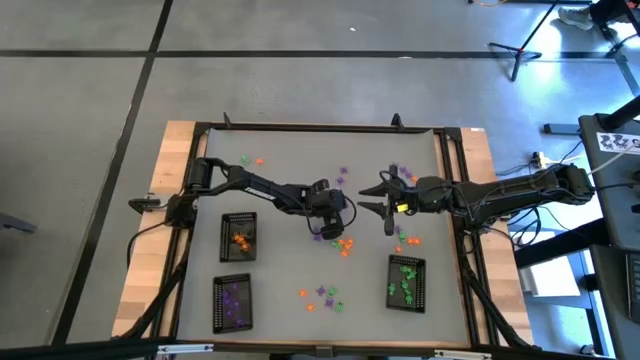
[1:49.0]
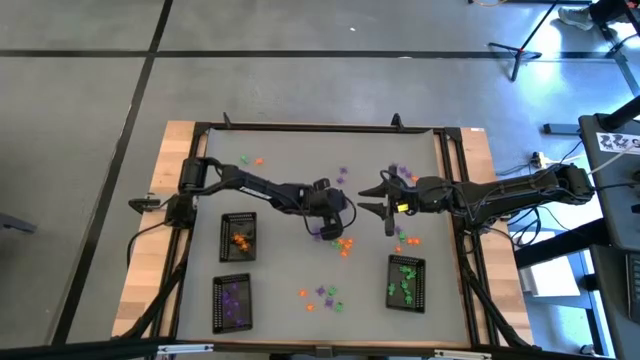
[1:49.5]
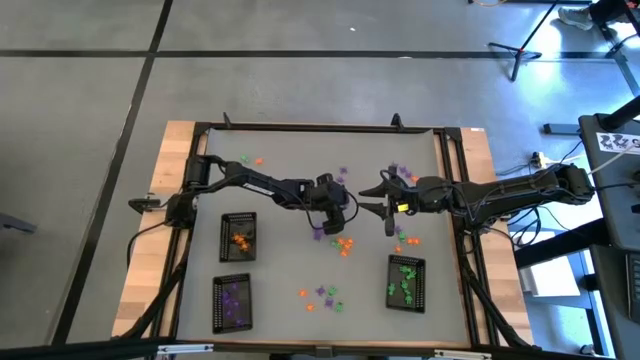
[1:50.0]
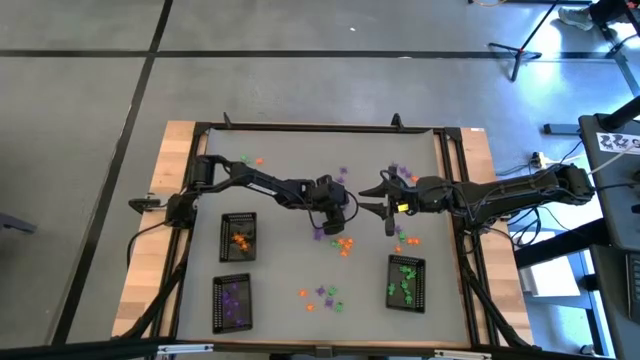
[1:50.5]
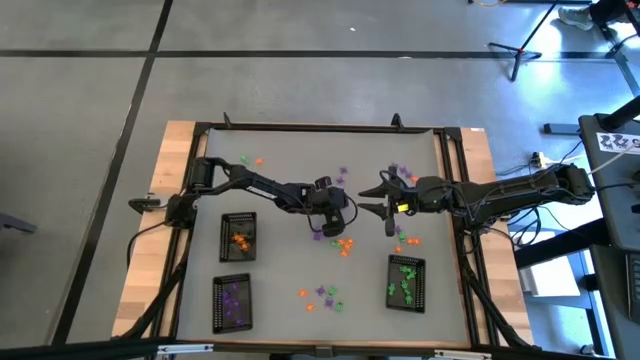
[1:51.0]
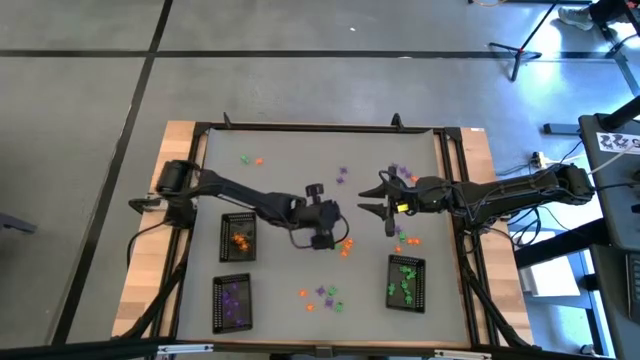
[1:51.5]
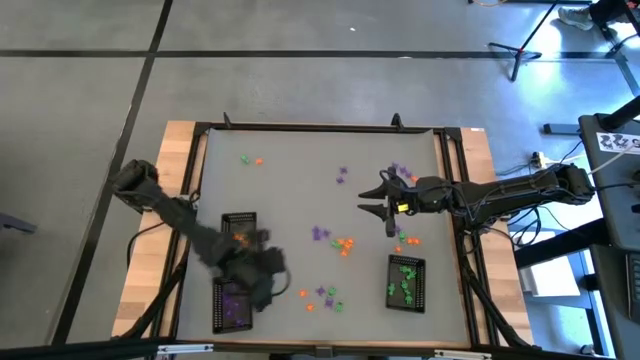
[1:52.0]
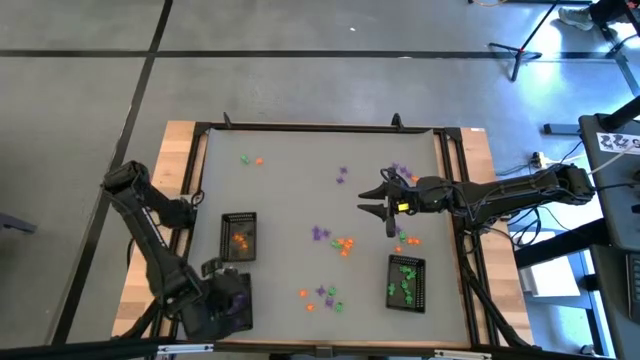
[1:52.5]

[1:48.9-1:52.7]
Task: Sort Halloween decoration
Put the purple spider toy into the bottom left black basket

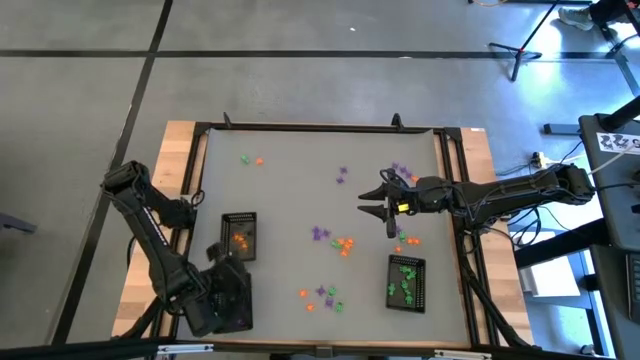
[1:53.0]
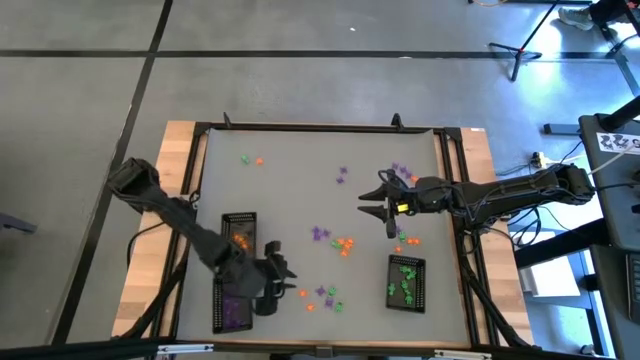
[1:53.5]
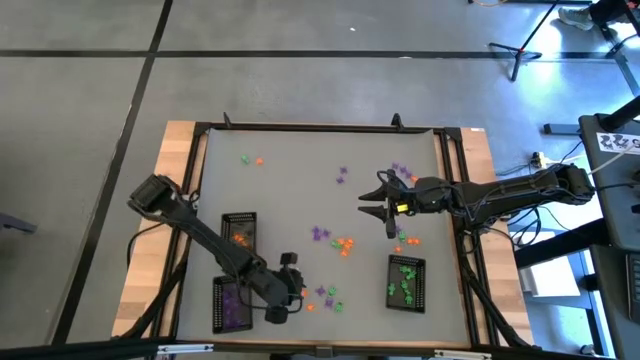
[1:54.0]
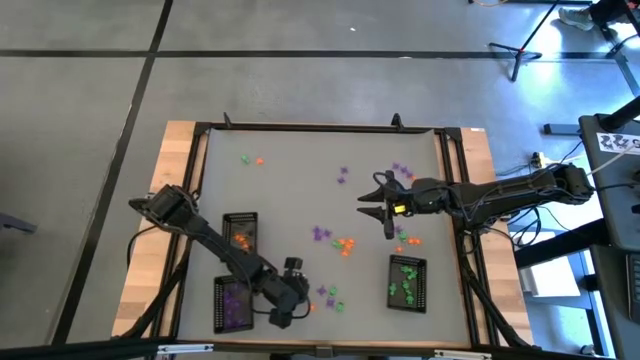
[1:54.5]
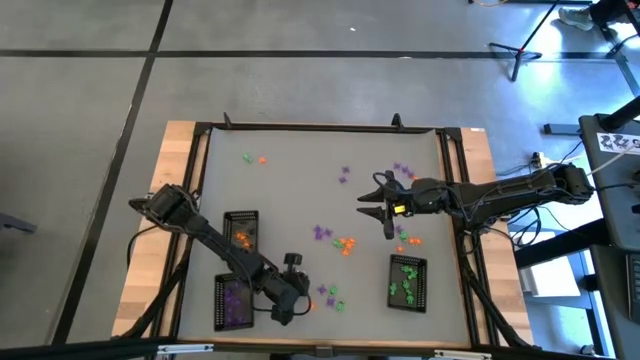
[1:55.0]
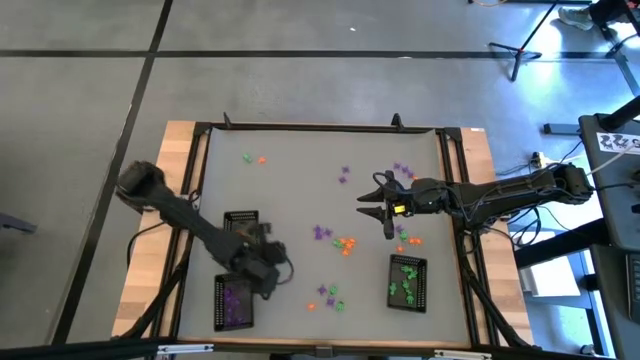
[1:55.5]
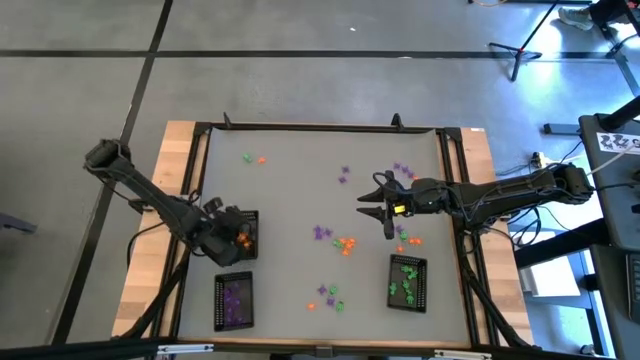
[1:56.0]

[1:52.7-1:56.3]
Put the orange spider toy into the top black basket

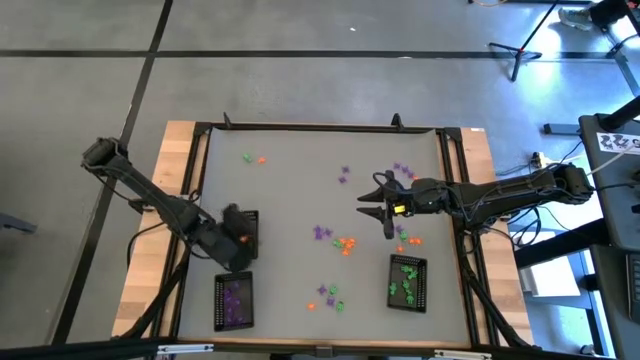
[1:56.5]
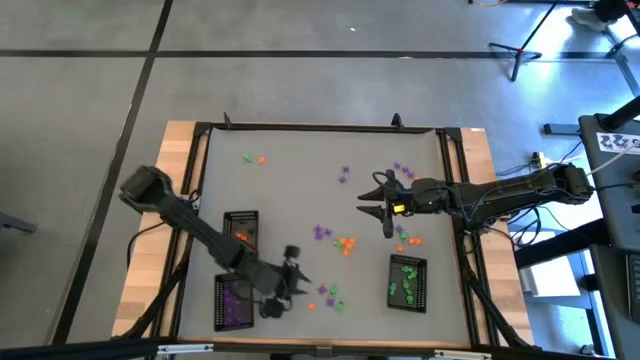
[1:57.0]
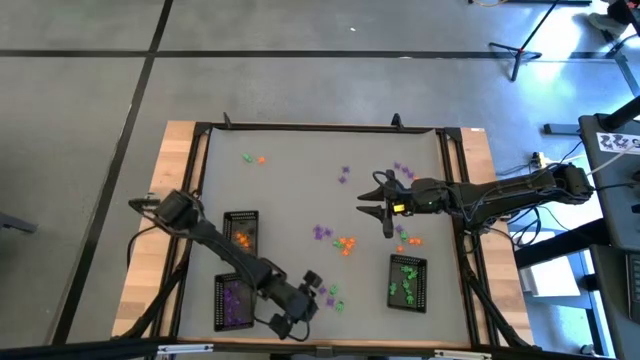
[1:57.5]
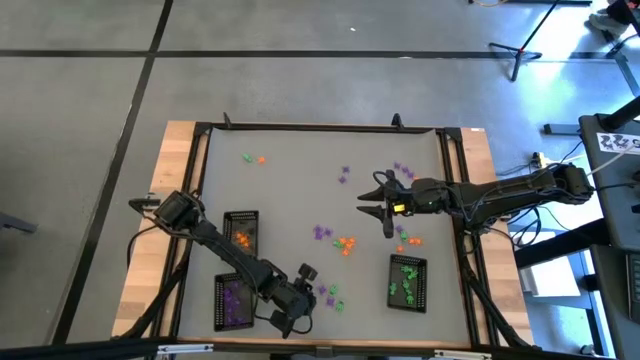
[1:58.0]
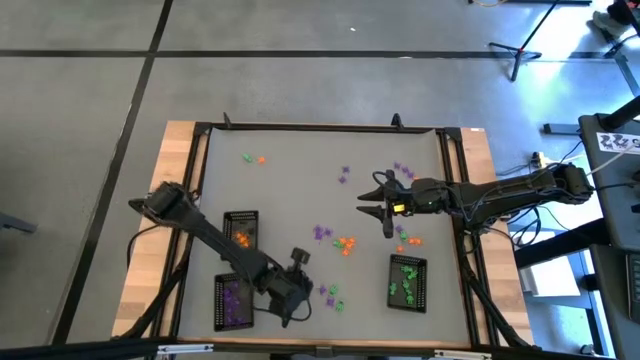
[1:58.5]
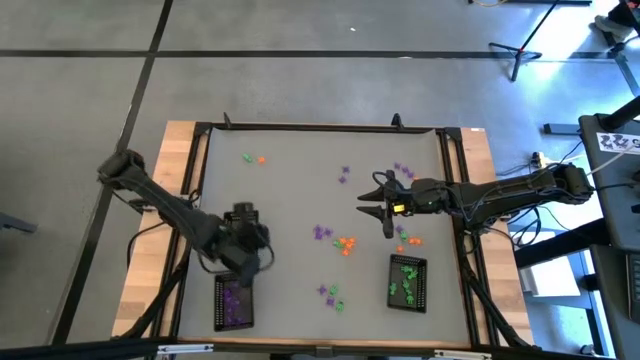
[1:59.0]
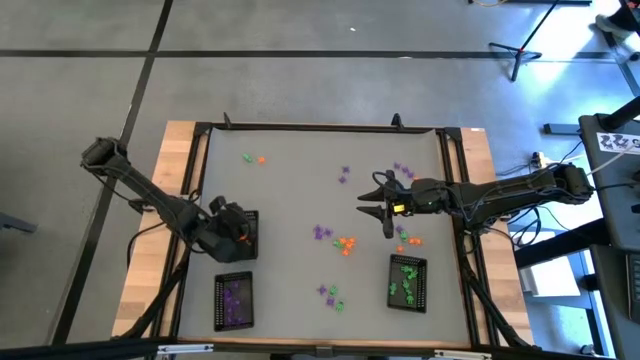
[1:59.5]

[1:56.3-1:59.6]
Put the orange spider toy into the top black basket

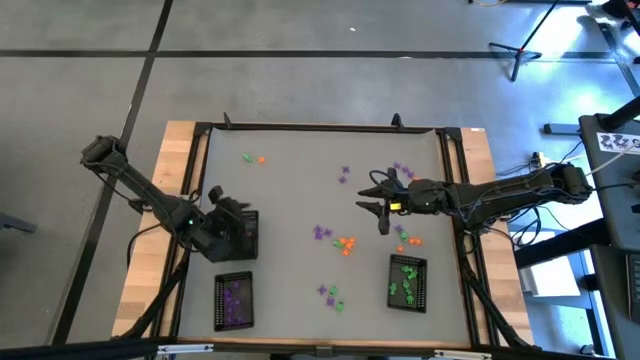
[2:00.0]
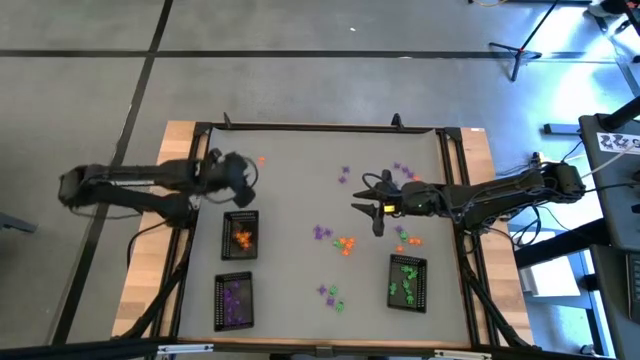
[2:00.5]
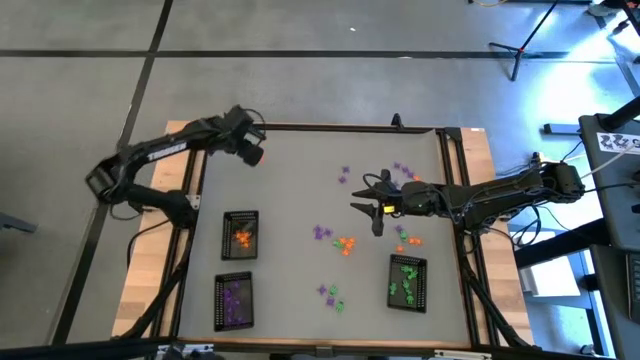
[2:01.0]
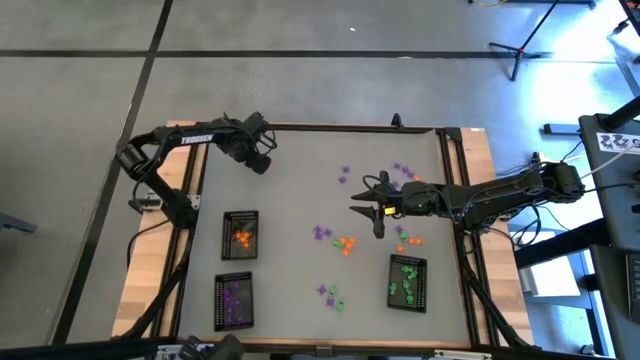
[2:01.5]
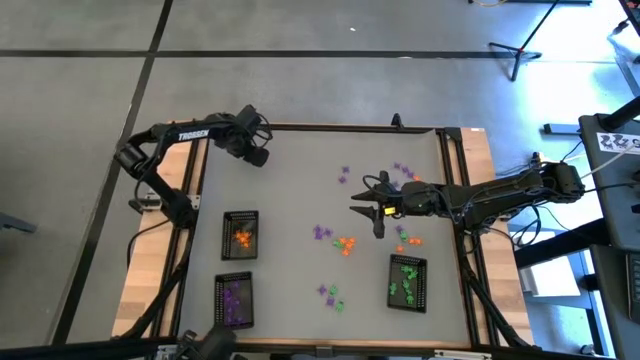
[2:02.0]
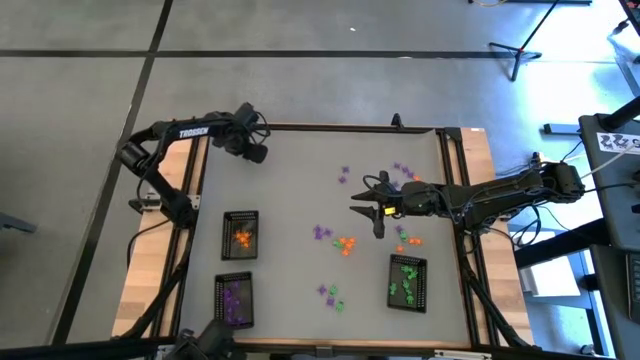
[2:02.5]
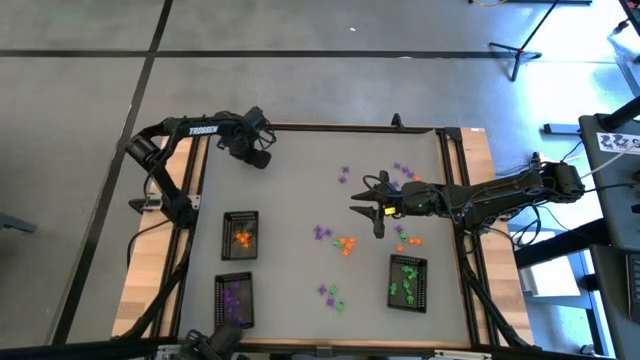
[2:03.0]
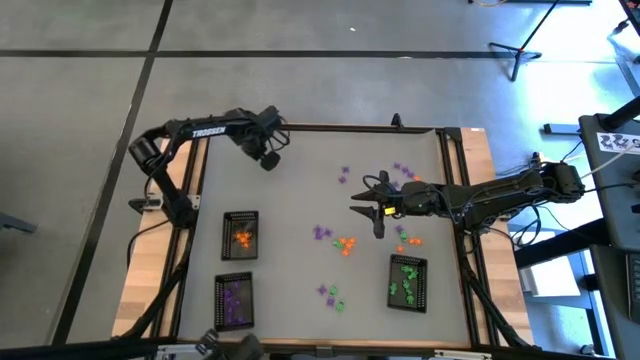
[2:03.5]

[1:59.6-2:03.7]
Put the green skeleton toy into the bottom right black basket

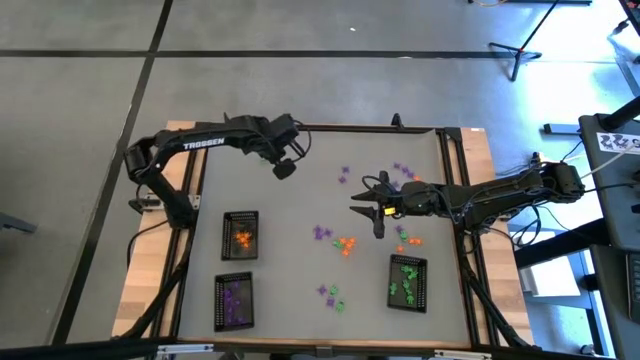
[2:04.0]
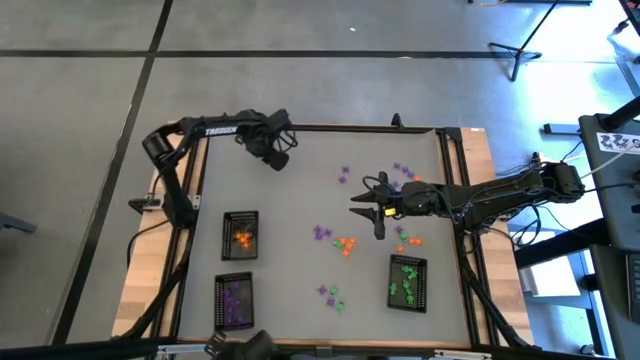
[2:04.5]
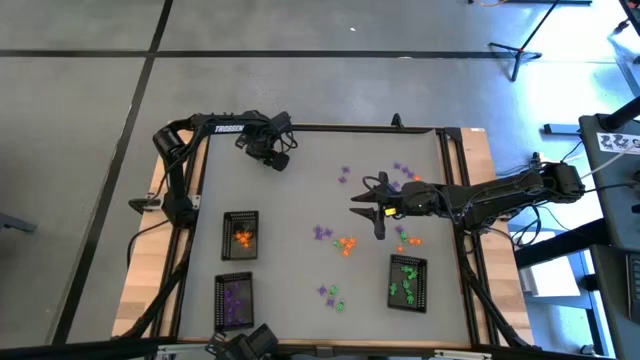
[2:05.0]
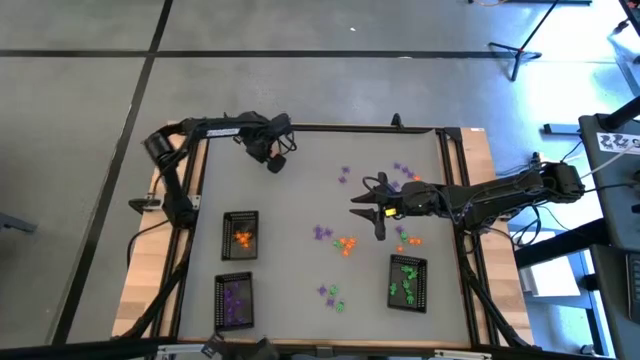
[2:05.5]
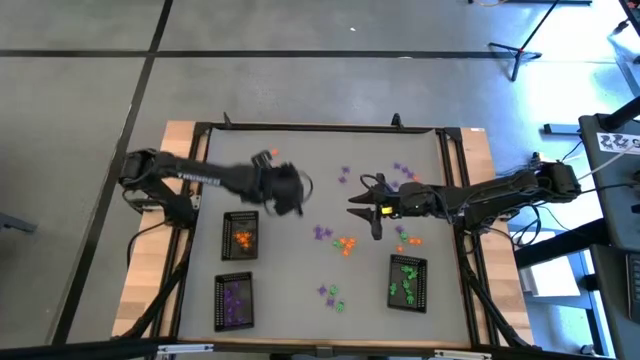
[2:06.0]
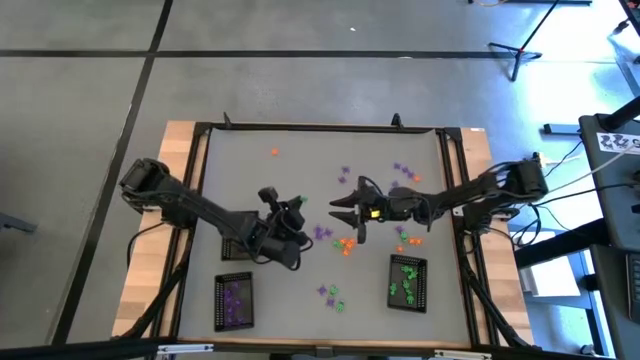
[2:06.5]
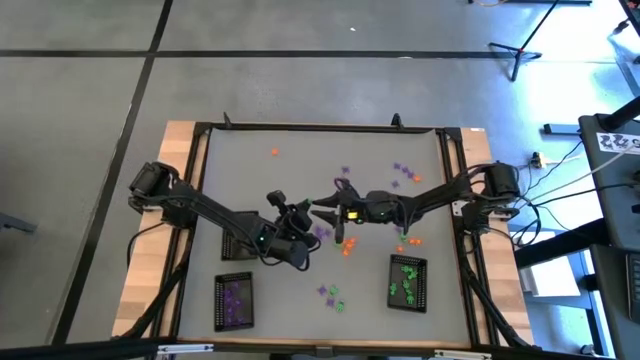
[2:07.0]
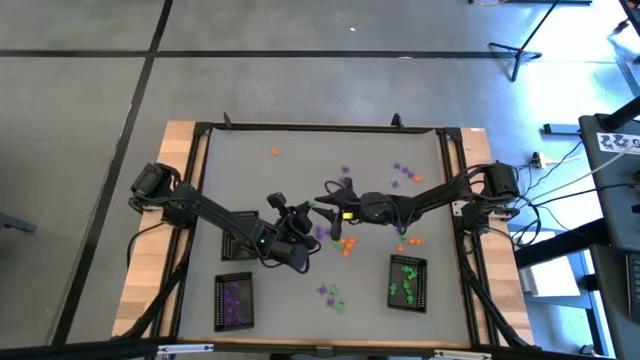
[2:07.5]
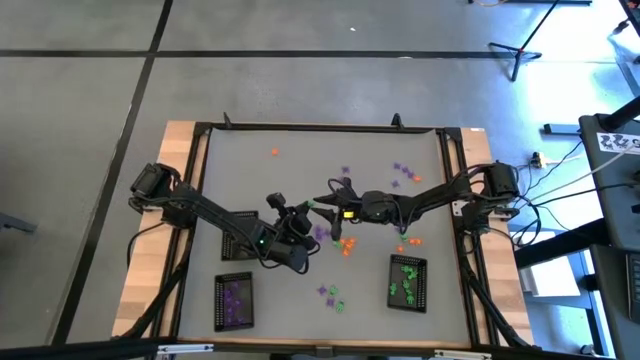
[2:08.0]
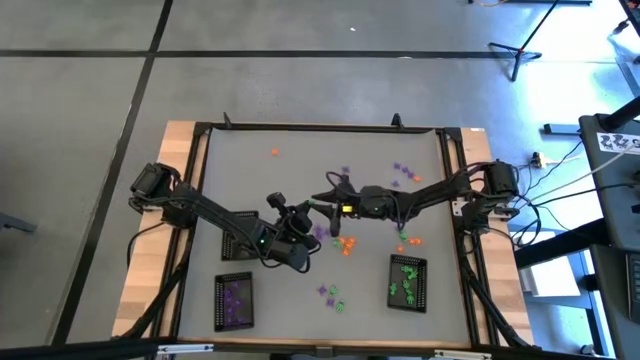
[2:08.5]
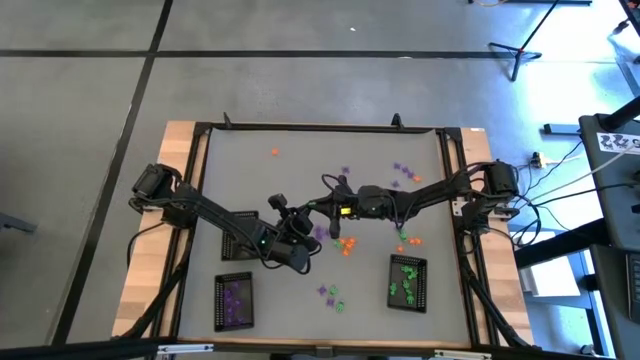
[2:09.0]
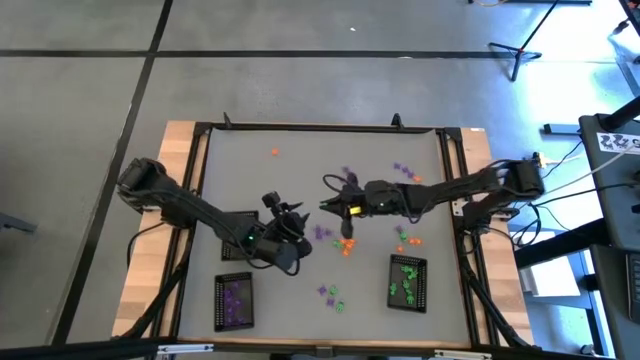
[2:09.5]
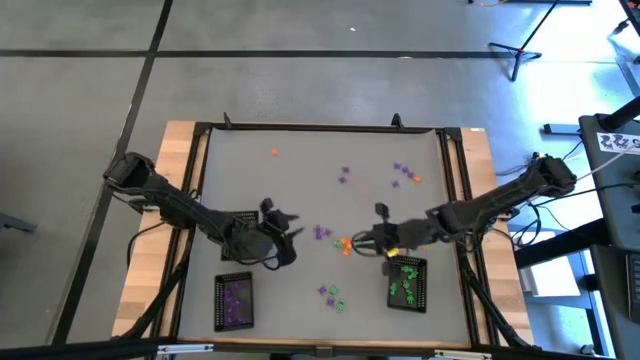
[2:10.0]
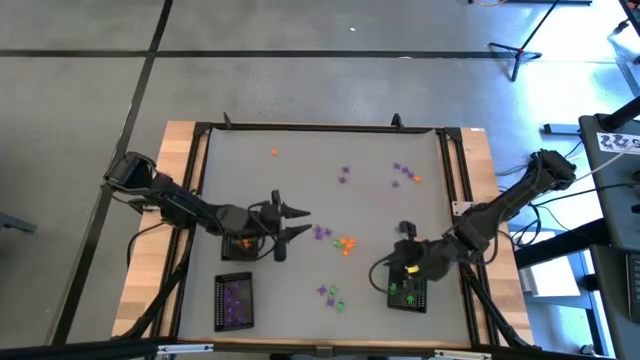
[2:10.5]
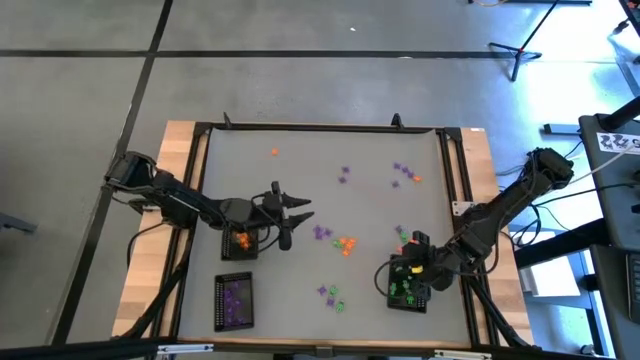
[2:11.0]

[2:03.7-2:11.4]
Put the green skeleton toy into the bottom right black basket
